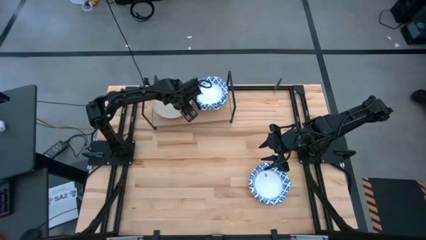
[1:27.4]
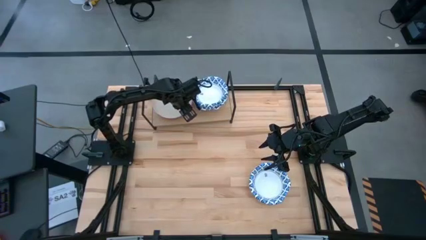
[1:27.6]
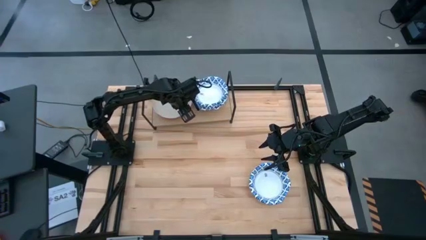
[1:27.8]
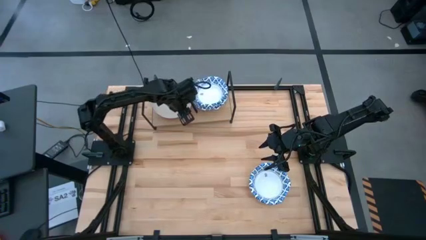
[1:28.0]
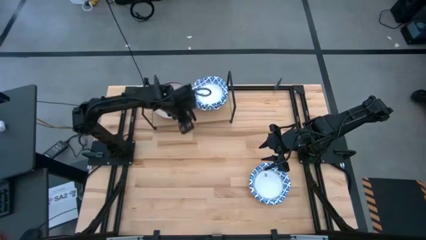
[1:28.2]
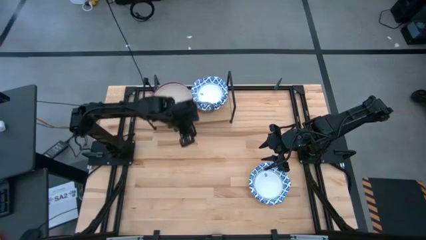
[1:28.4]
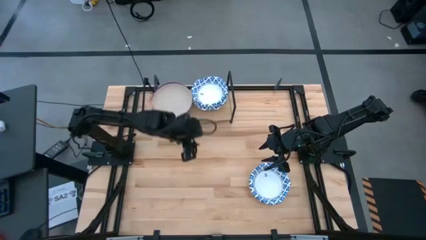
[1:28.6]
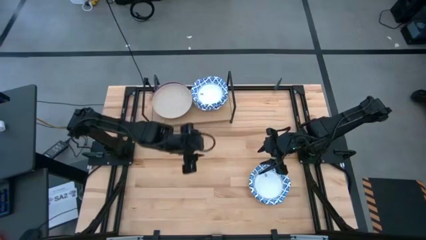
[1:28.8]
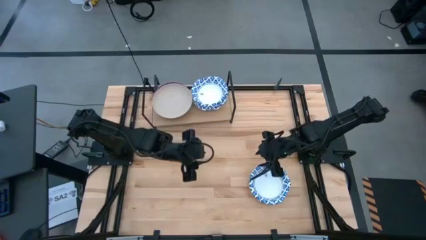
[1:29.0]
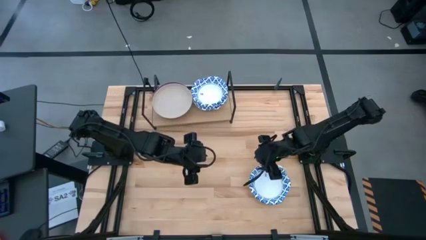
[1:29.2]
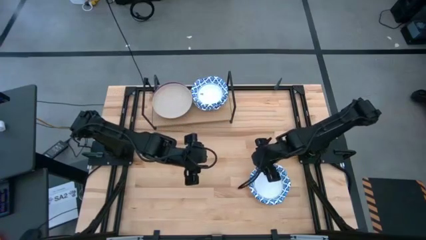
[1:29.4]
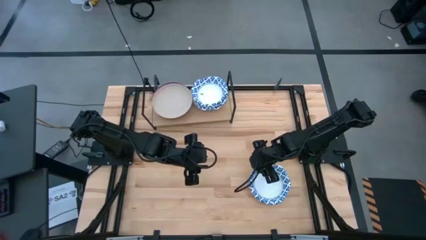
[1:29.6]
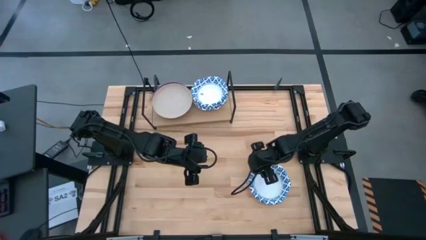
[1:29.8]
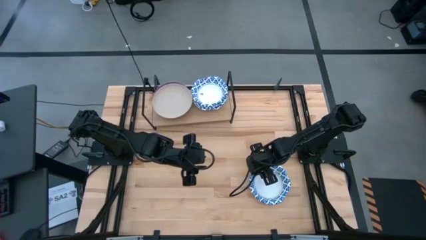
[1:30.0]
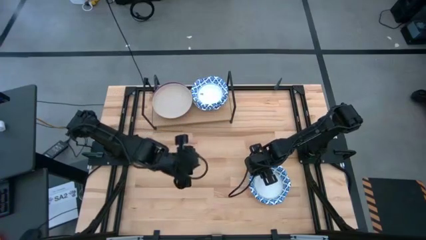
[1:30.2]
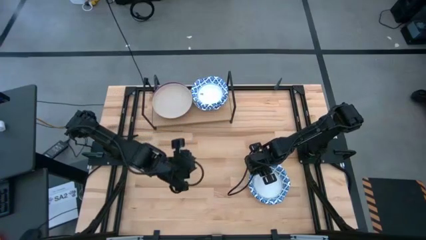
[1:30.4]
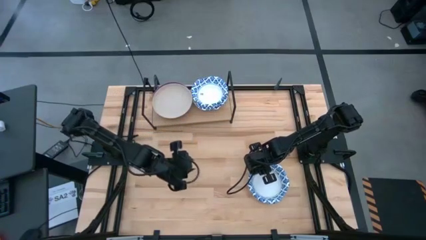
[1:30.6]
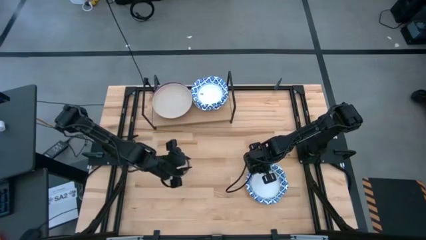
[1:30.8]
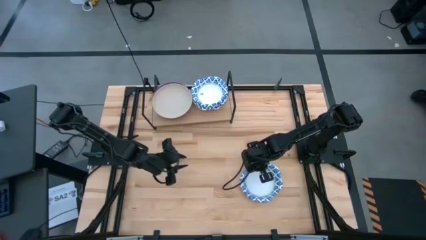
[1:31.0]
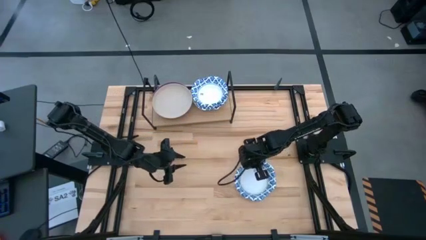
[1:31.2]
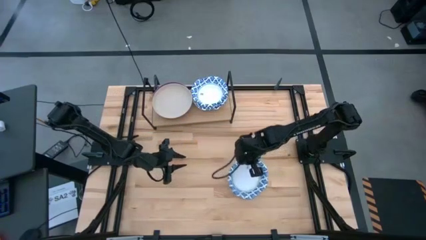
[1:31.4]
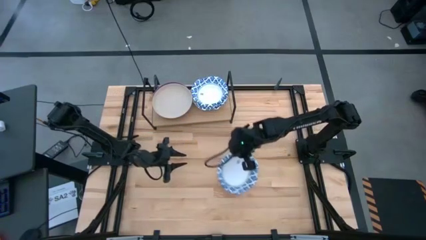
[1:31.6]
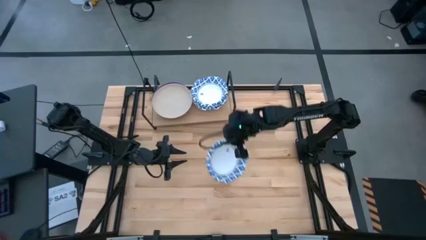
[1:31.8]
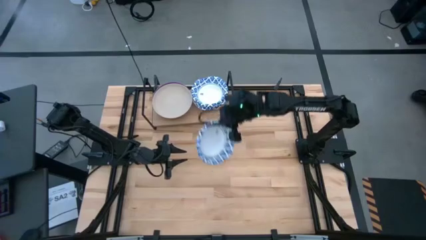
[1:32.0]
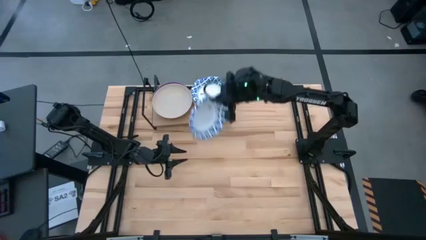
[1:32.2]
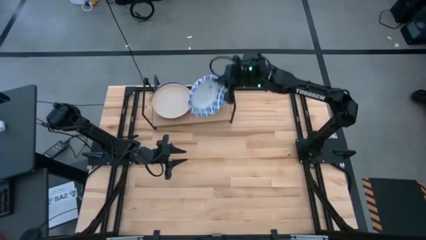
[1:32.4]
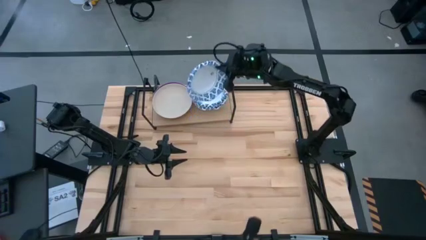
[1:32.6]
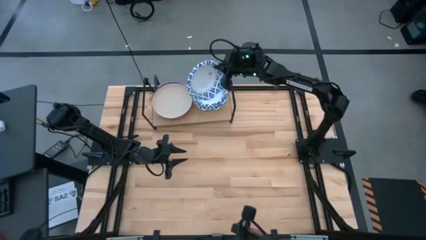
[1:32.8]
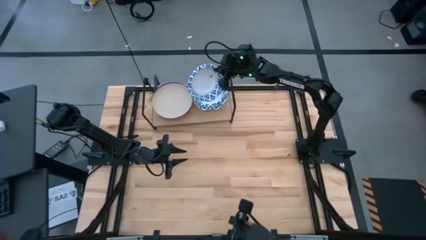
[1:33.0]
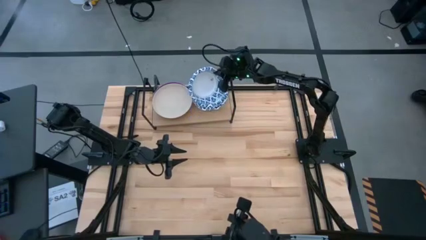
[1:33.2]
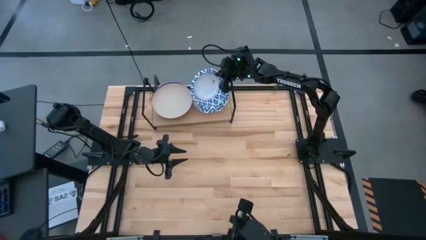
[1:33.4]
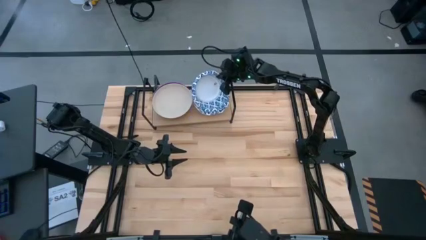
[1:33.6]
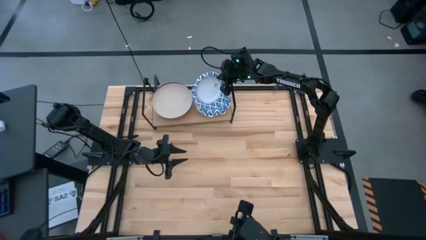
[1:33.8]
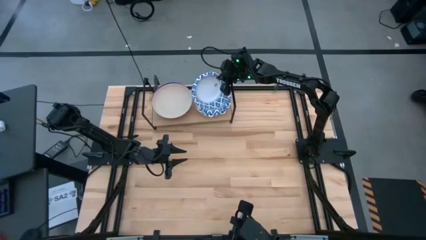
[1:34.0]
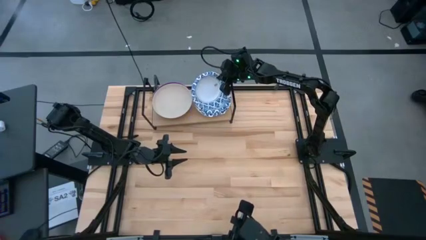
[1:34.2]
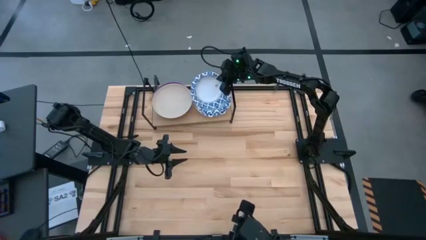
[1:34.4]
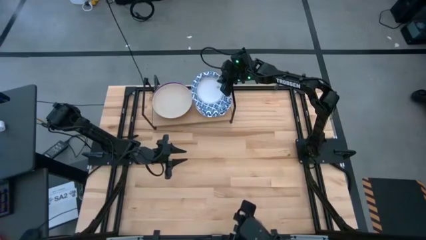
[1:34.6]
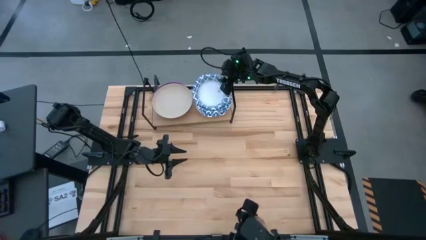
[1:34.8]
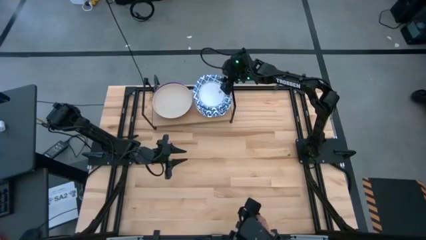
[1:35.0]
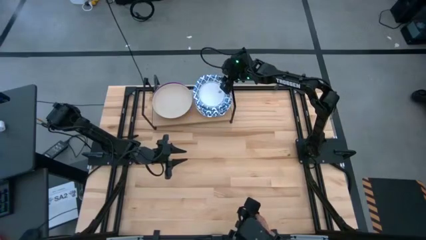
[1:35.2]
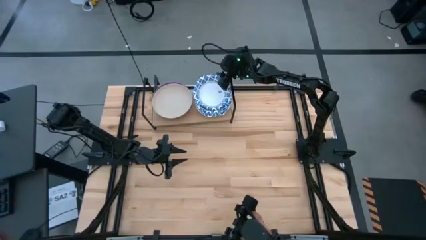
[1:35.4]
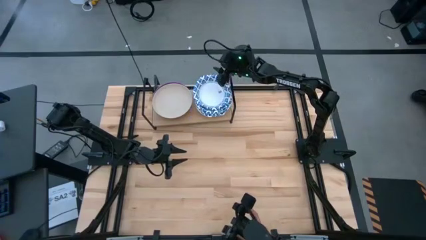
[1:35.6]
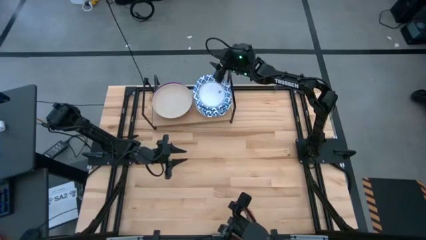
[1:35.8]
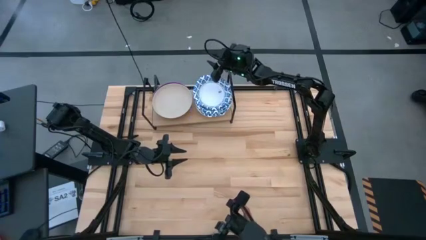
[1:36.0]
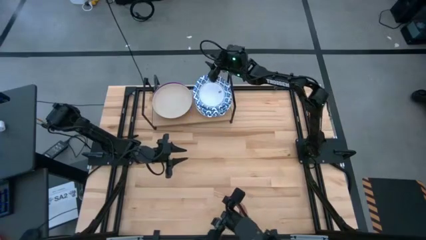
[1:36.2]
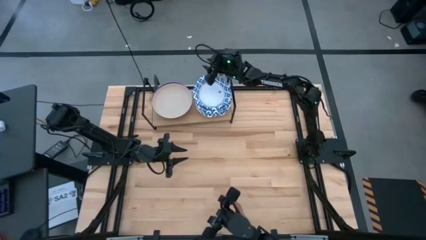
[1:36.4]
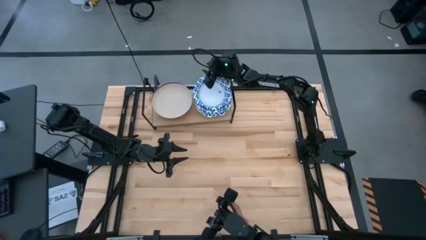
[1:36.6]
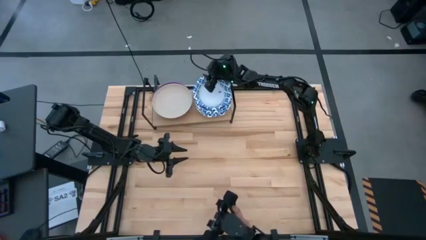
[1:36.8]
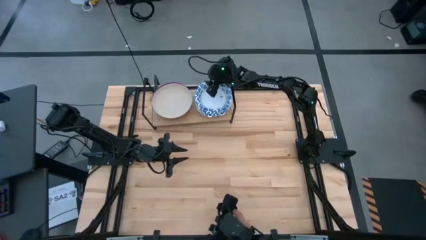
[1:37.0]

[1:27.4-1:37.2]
Task: Place and stack plates onto a shelf
Stack the white bowl on top of the white bowl on the shelf

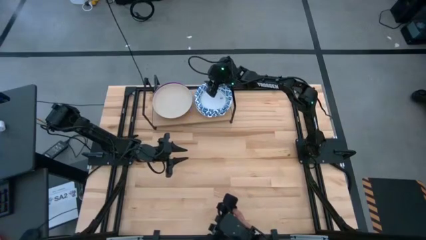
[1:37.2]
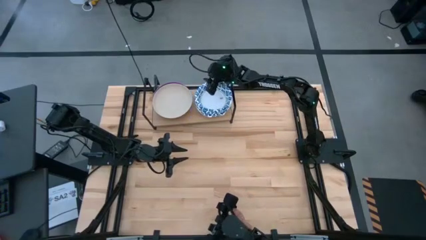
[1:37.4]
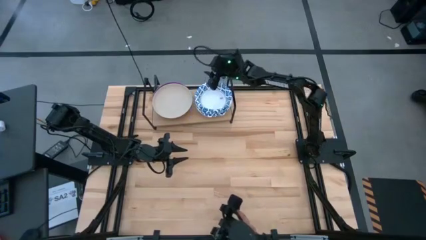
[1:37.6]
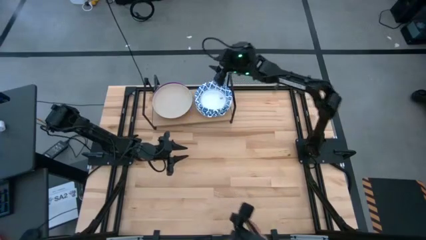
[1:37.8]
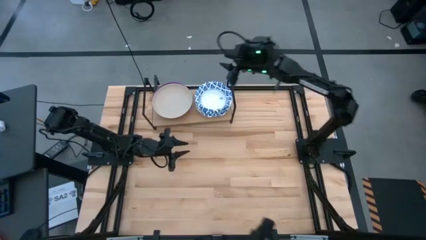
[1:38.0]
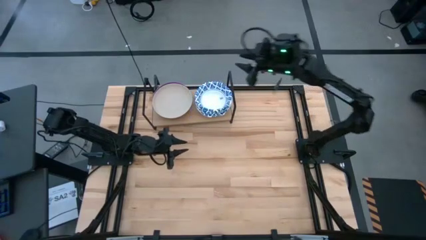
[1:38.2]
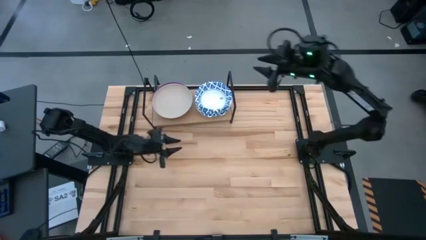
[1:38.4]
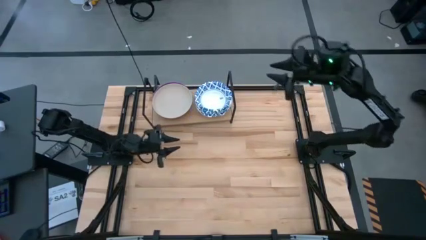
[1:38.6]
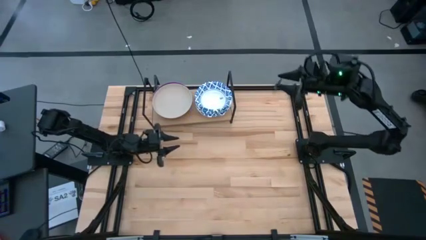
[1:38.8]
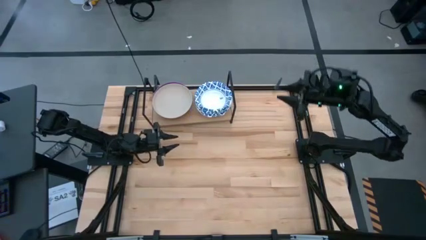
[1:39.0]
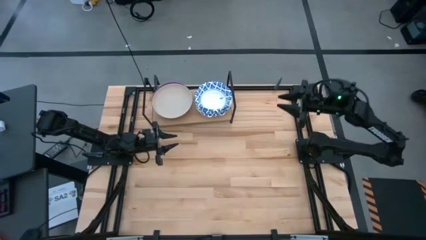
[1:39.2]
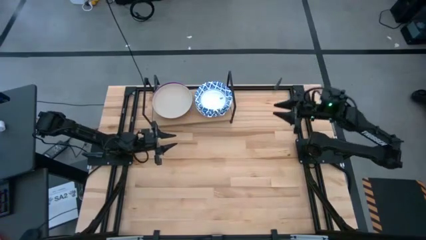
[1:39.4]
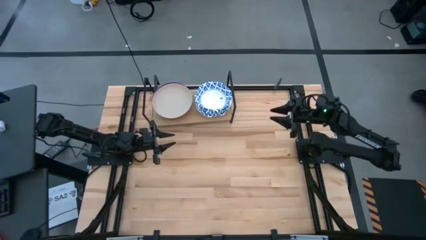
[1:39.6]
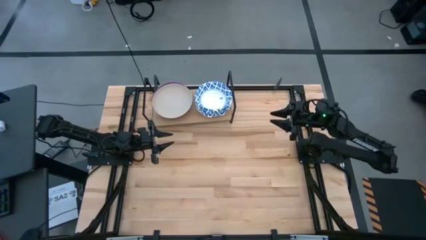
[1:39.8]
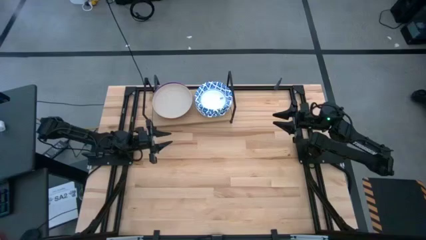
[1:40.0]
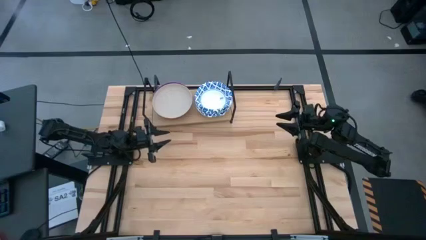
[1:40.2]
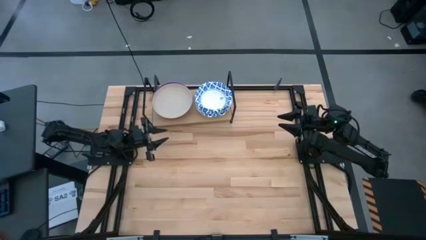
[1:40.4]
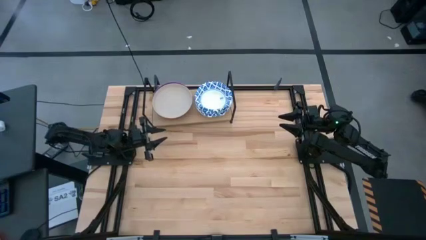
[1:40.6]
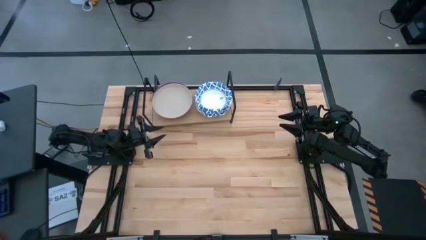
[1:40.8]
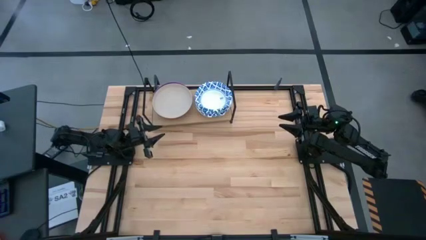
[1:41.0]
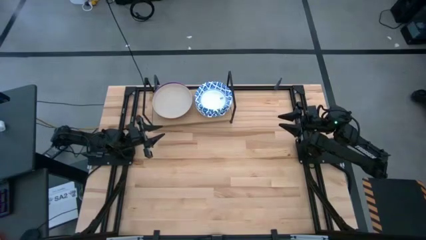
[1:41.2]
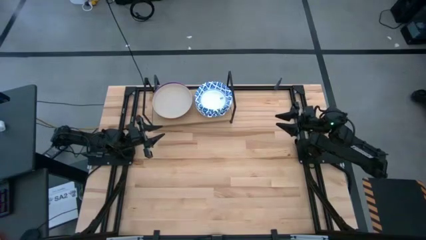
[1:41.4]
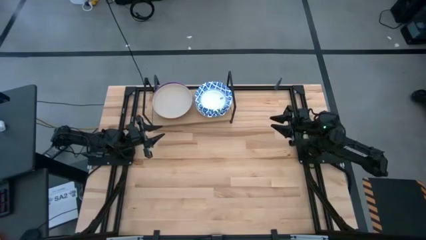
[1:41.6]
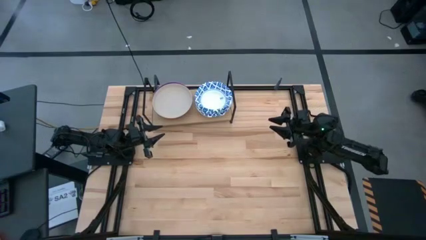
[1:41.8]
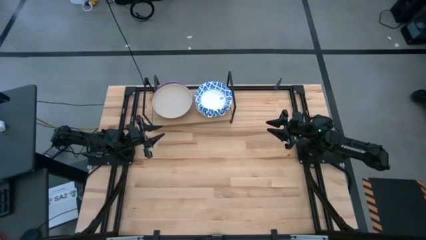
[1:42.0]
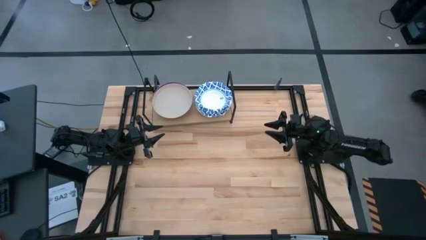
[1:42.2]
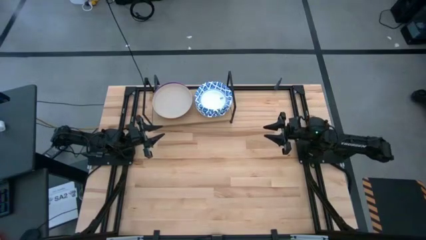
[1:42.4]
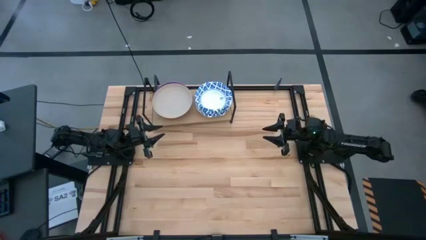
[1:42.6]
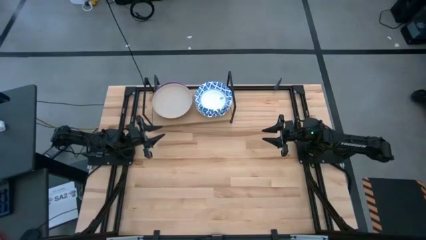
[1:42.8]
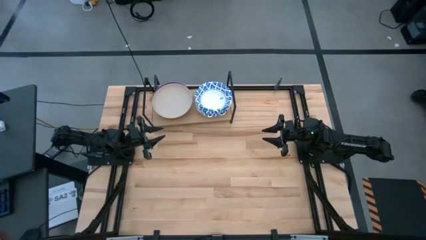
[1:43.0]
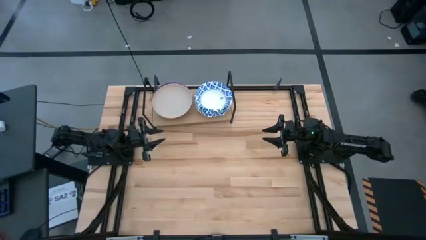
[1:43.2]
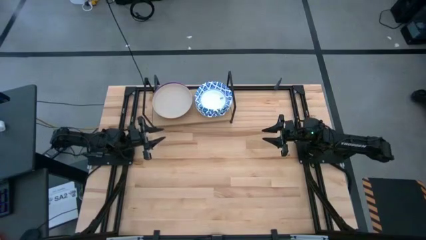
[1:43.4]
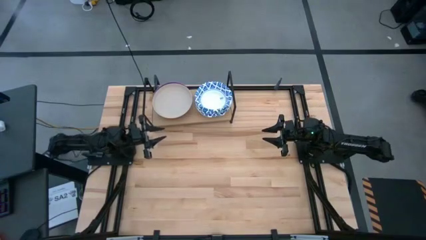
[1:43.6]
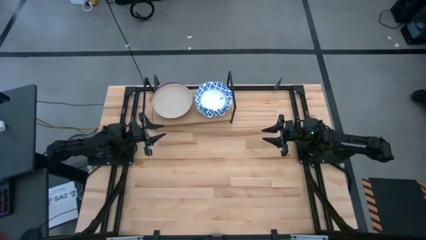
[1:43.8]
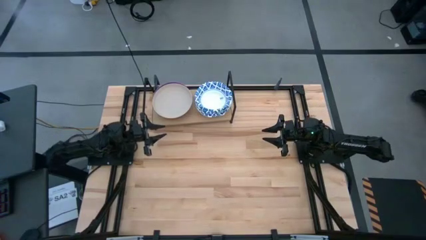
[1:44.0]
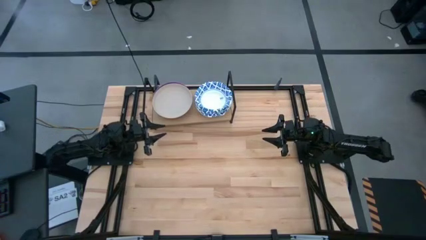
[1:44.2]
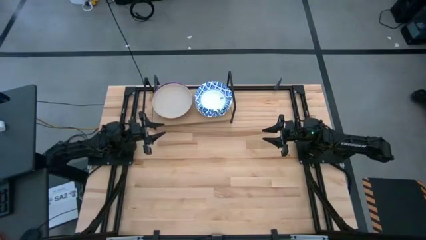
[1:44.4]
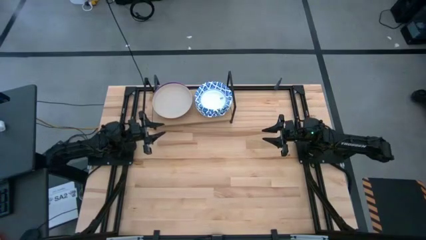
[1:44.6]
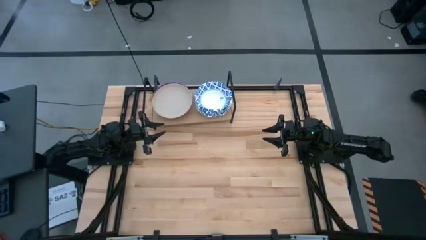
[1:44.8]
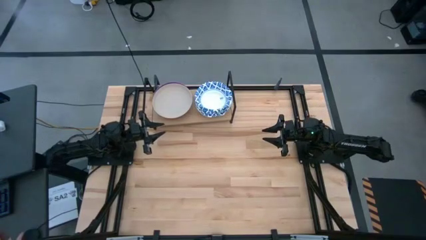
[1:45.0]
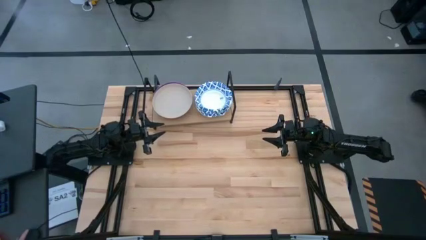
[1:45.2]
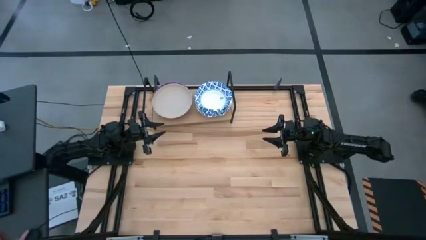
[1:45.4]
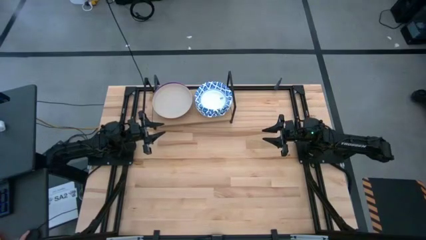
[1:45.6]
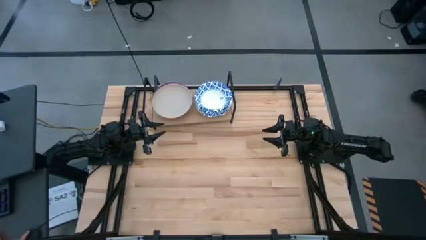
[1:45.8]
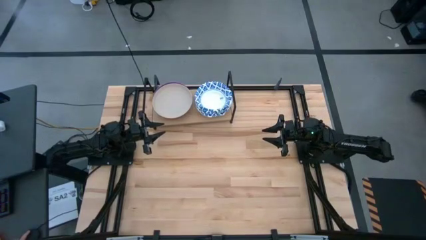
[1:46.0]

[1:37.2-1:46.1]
Return to Home Position
